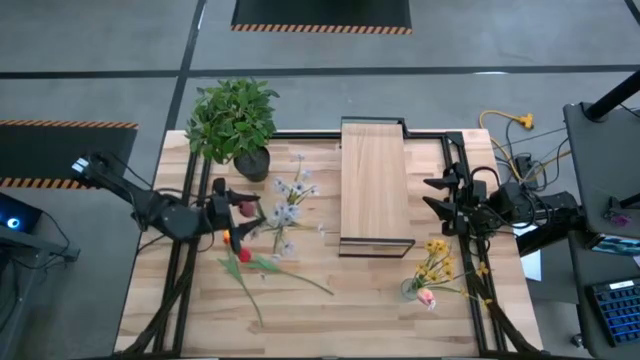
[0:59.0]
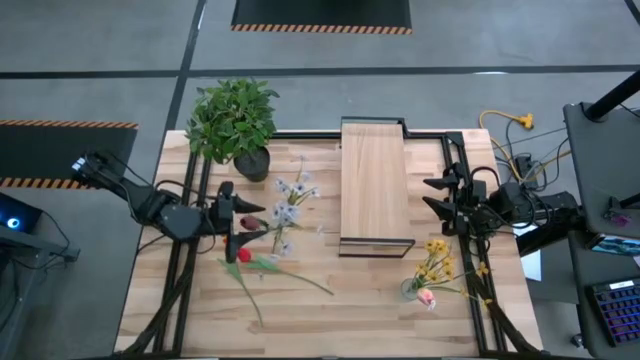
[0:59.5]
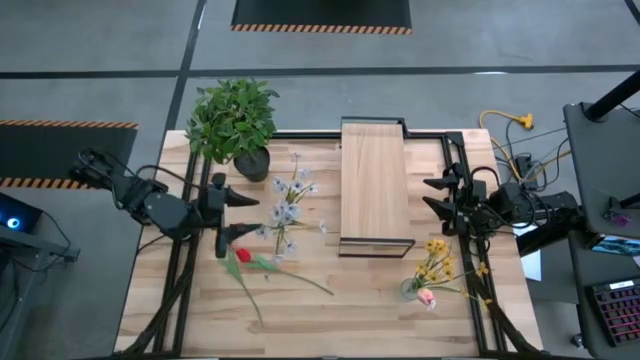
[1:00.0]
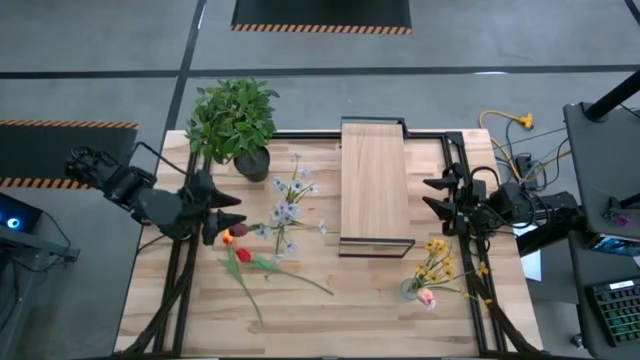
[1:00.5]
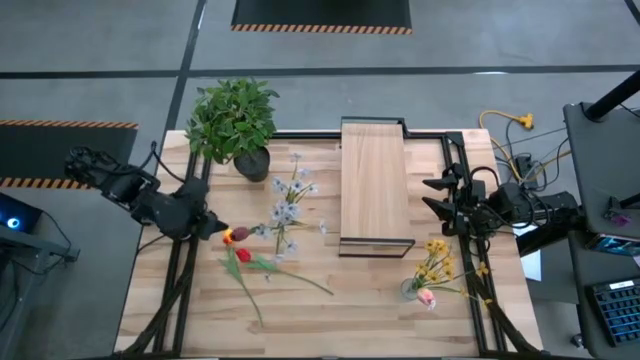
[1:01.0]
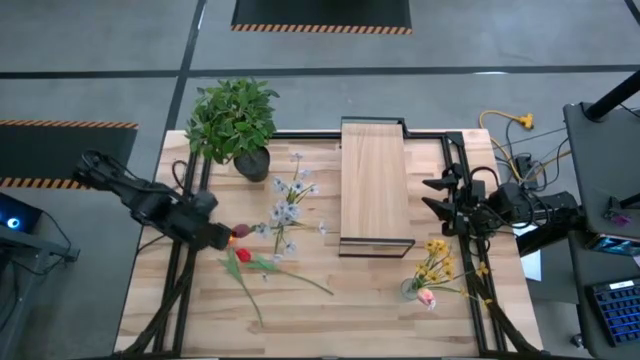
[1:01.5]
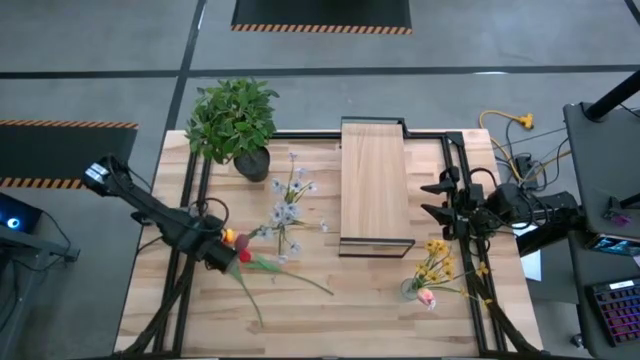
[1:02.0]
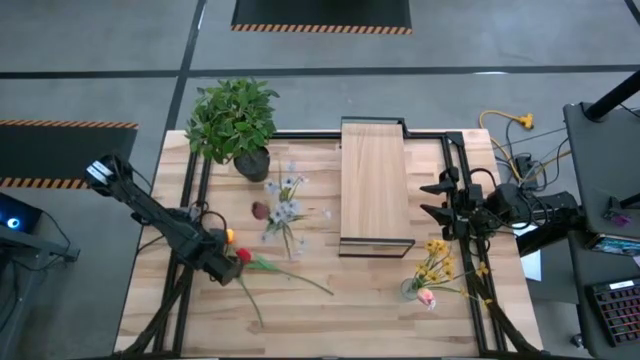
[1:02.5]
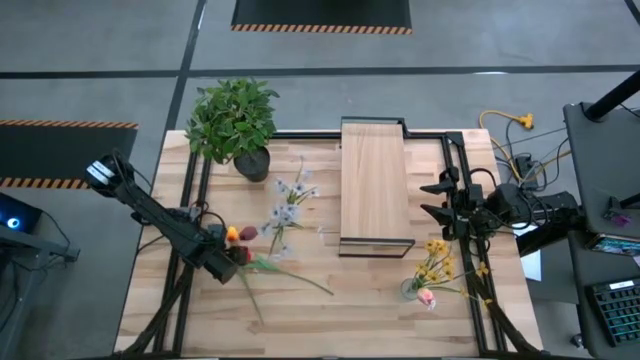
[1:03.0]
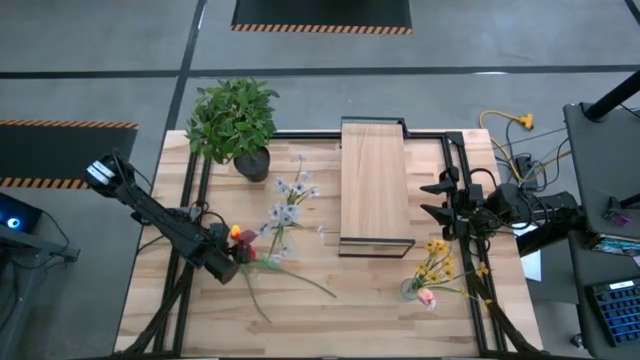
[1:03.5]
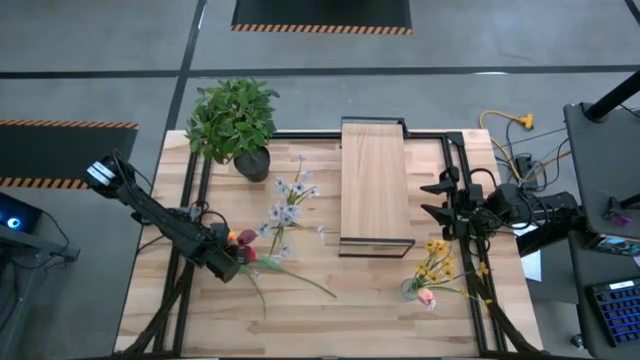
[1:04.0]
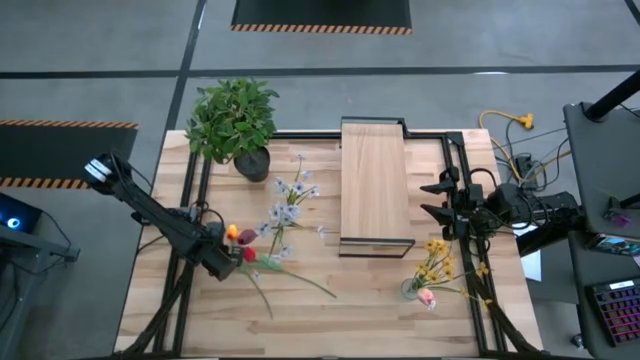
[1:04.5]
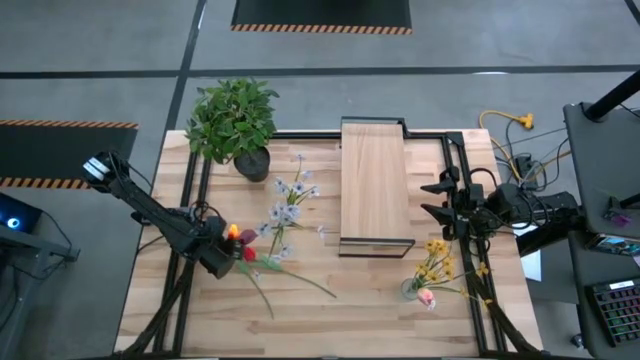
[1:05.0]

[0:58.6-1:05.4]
Task: Pick and place flowers into a vace then onto a shelf
Put the yellow tulip into the left transparent glass vase

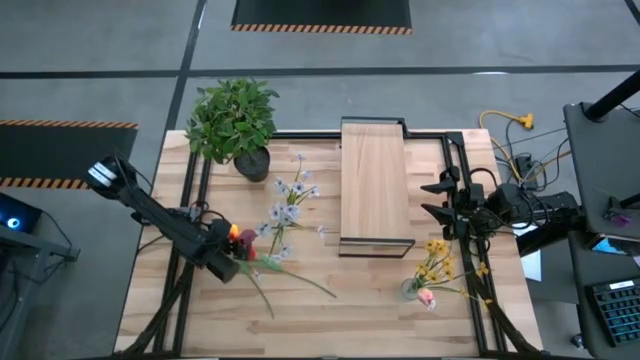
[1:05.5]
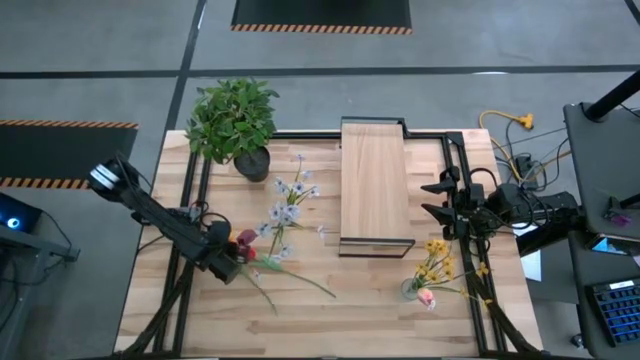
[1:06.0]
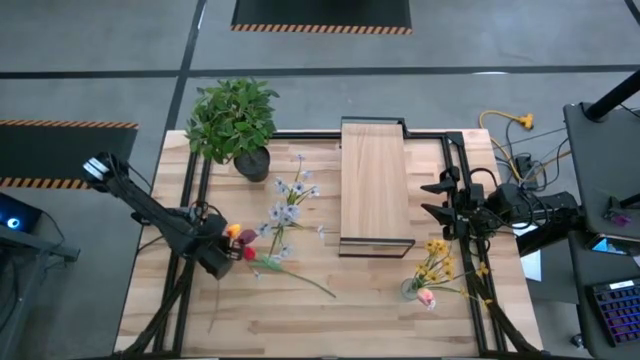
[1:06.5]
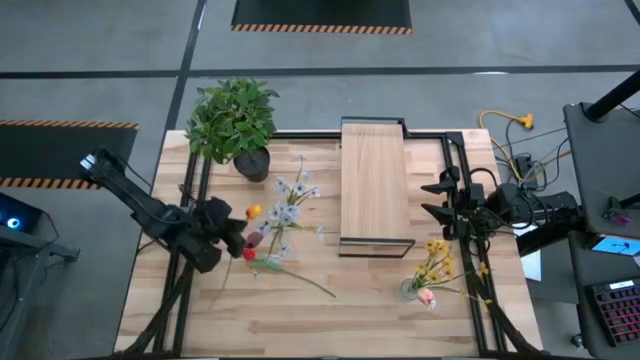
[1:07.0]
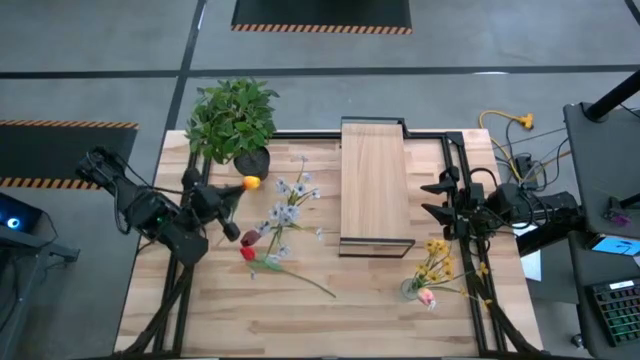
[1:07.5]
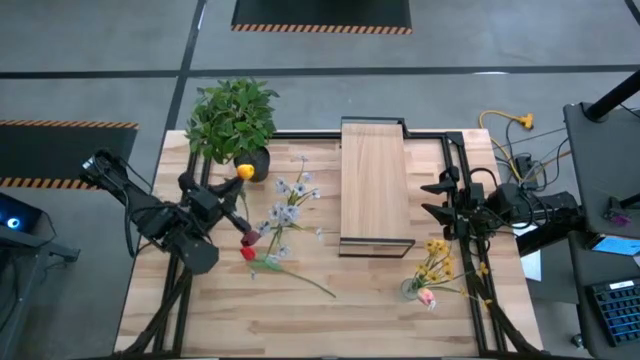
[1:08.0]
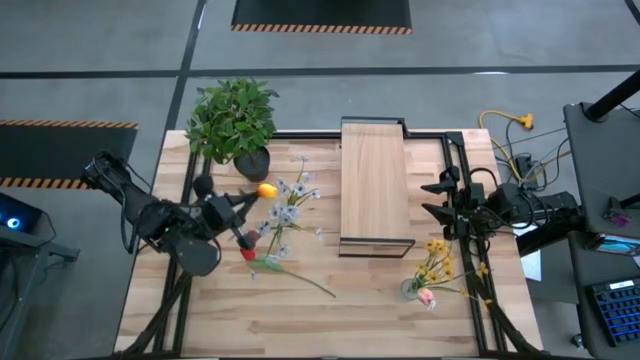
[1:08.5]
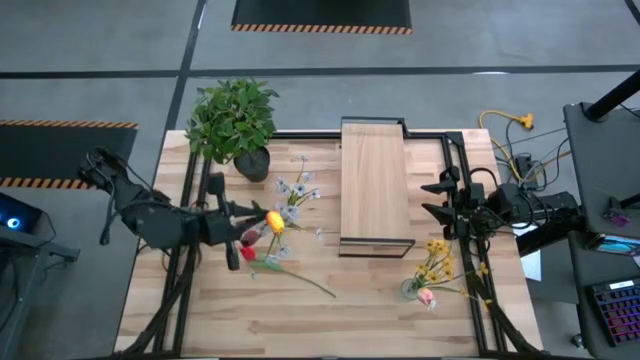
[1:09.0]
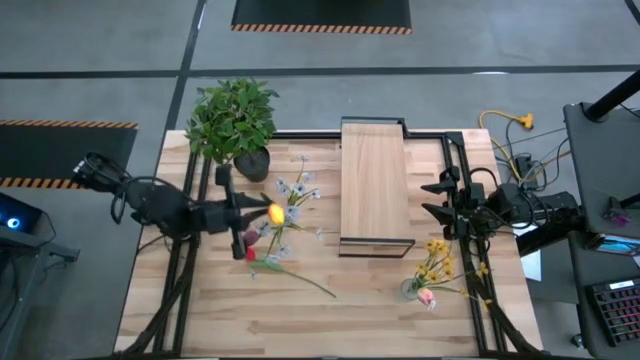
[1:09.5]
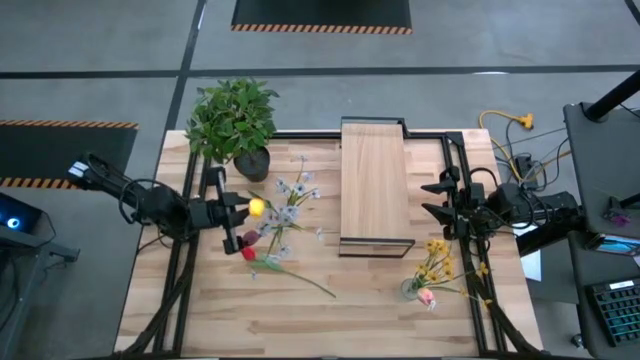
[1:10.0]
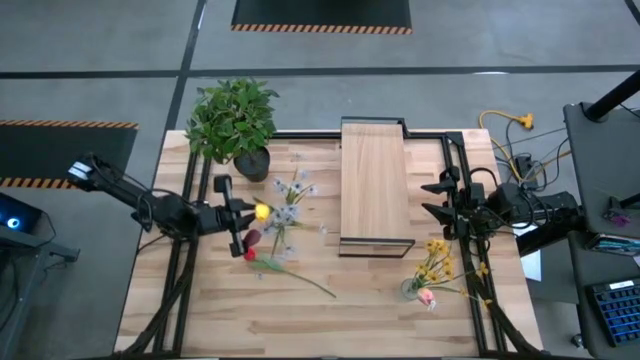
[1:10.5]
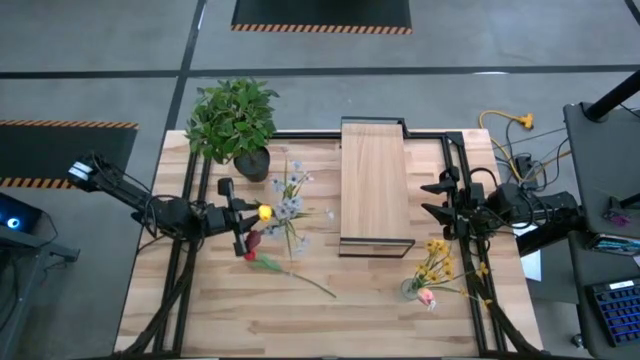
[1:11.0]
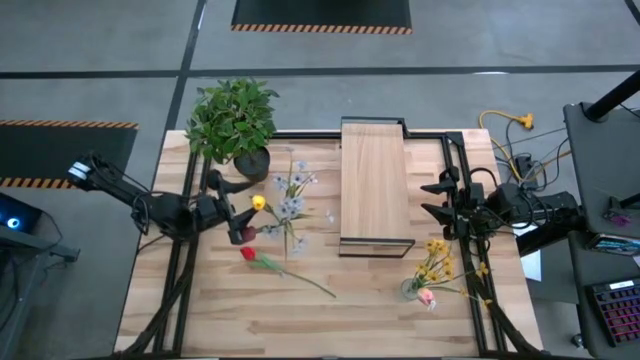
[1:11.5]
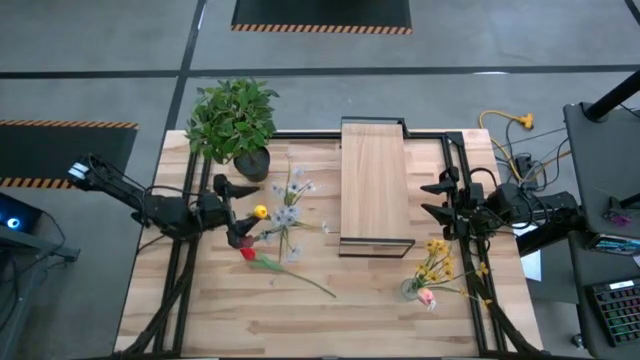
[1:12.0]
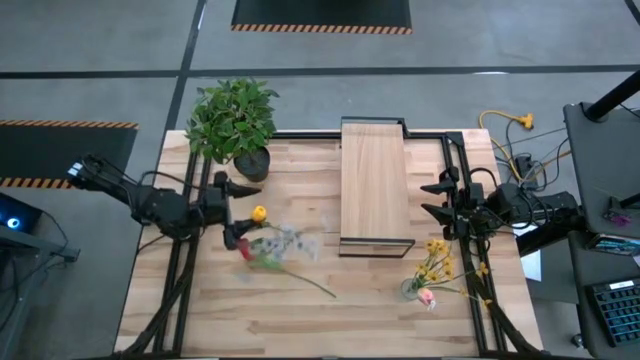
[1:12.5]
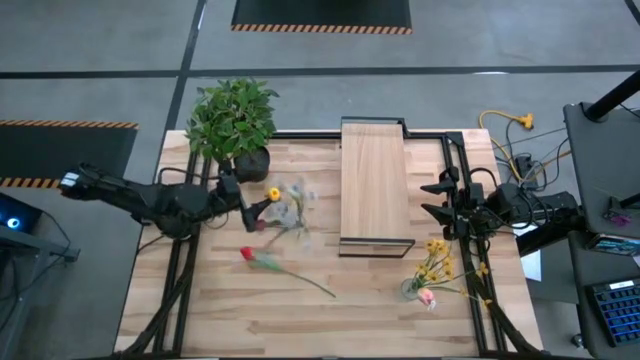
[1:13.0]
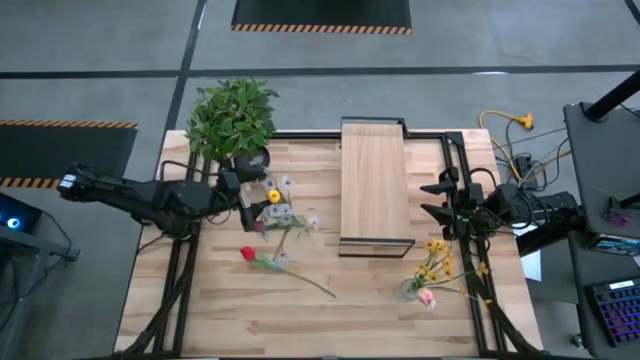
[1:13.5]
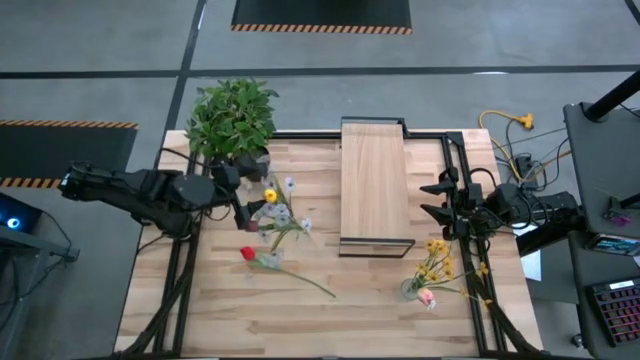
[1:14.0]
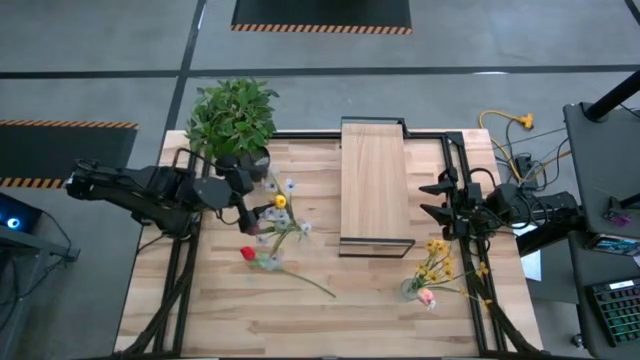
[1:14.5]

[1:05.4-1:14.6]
Put the yellow tulip into the left transparent glass vase

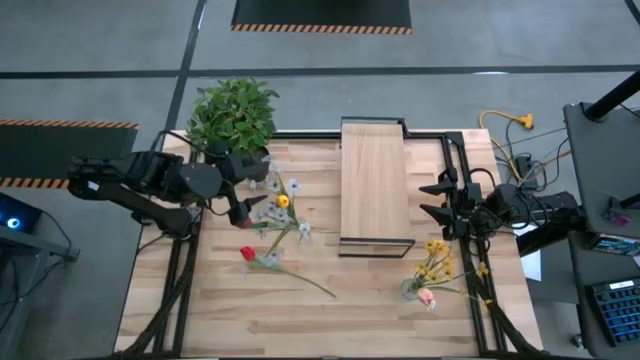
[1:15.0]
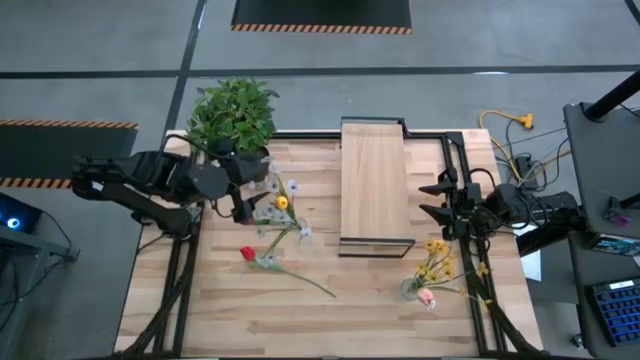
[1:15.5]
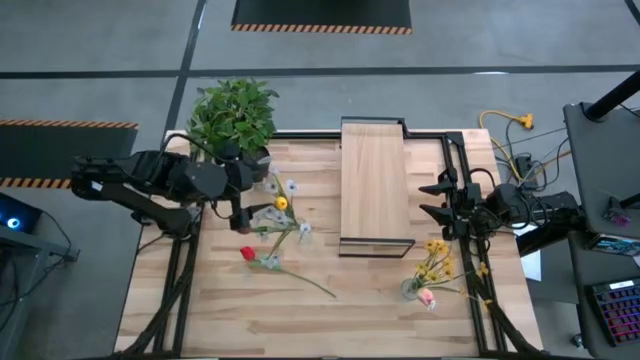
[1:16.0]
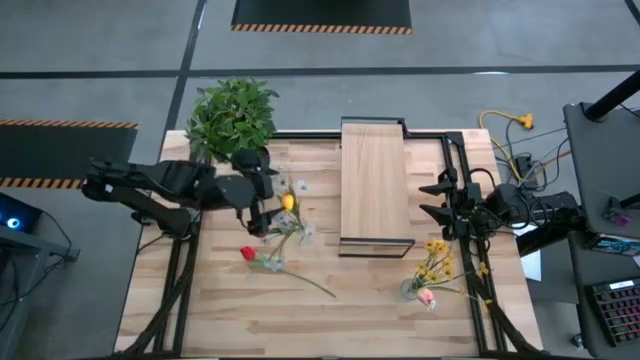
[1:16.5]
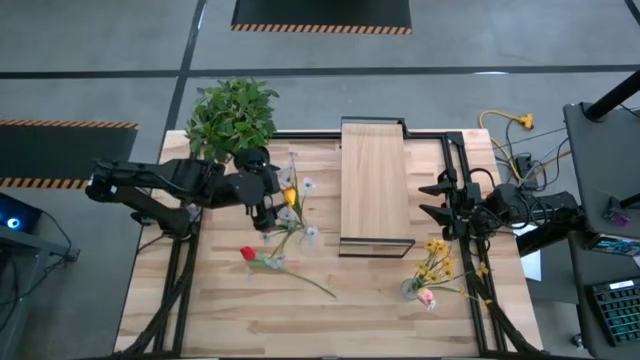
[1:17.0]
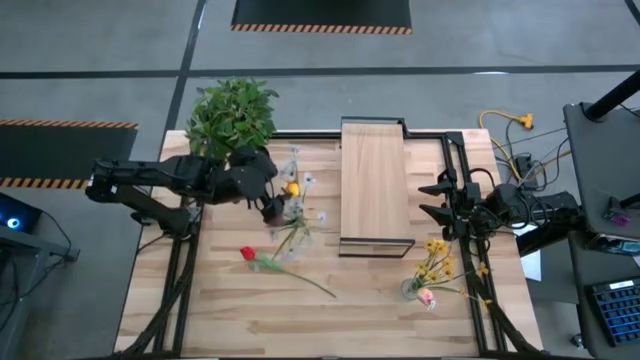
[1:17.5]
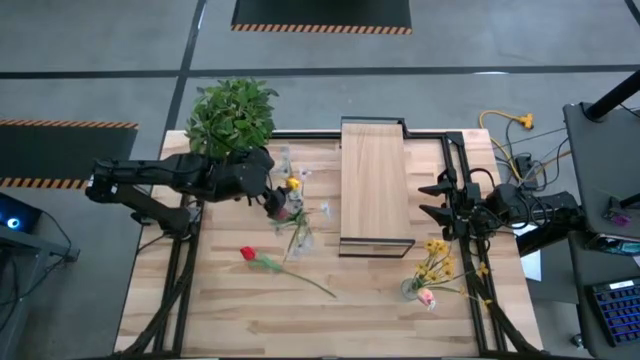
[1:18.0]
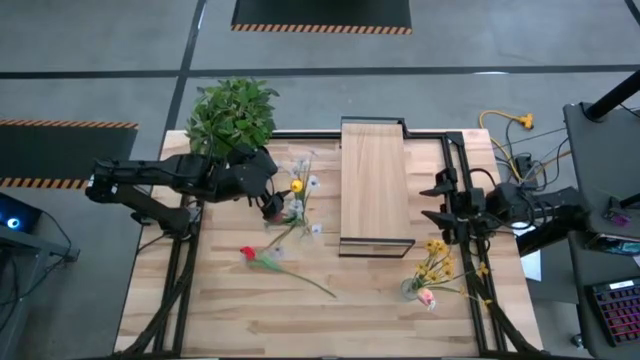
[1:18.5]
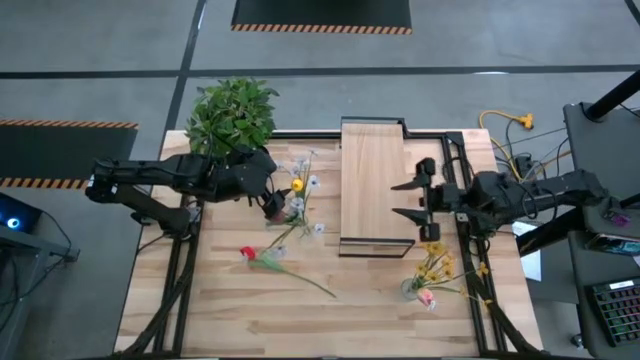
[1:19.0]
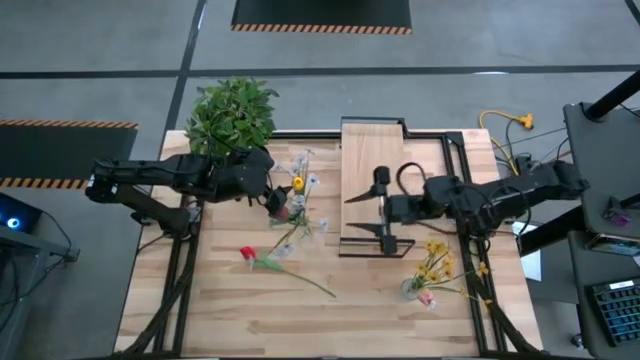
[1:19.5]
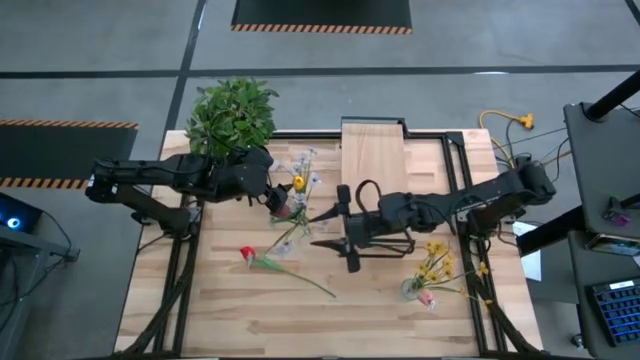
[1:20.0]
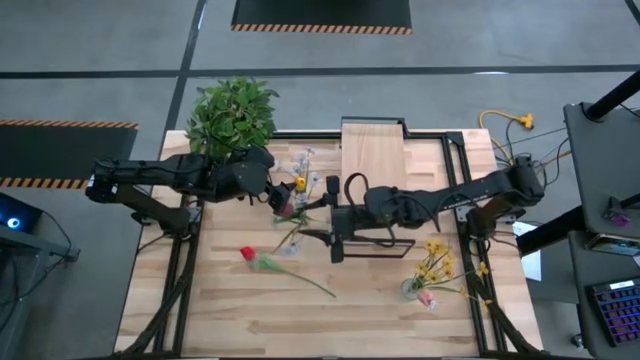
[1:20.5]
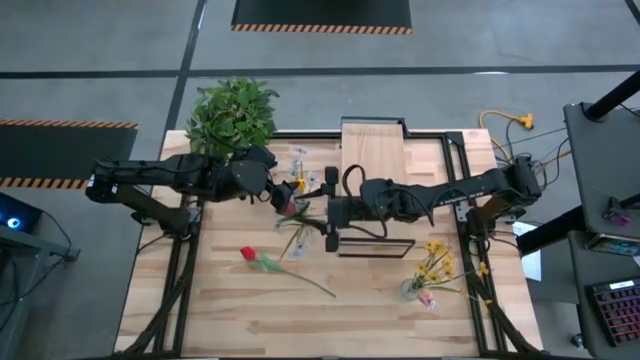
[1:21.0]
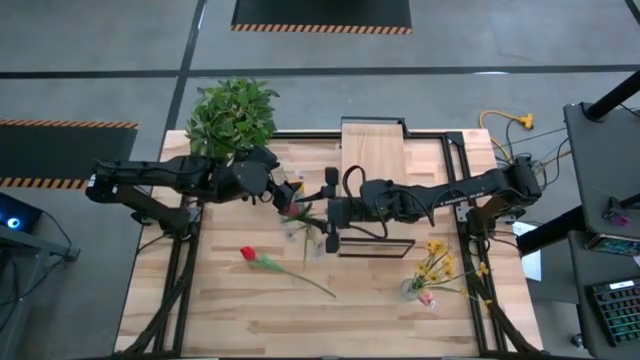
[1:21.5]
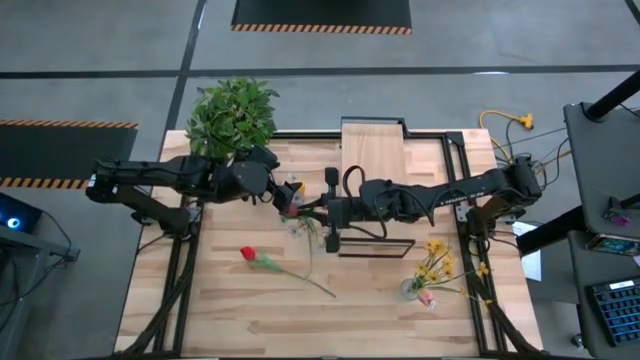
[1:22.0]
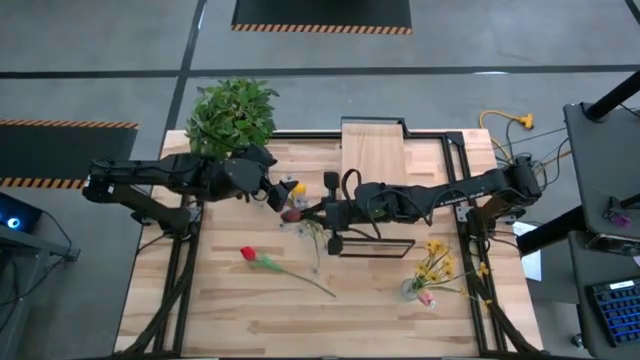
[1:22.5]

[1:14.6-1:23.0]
Adjust the maroon tulip in the left transparent glass vase
